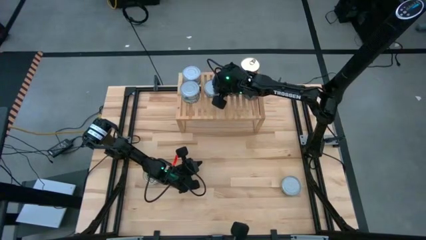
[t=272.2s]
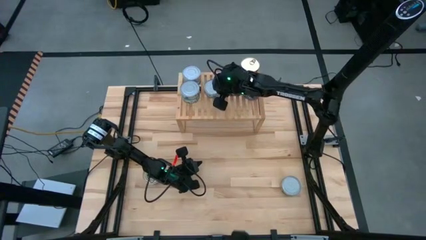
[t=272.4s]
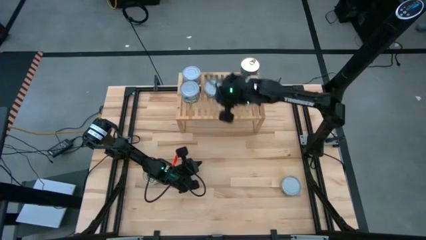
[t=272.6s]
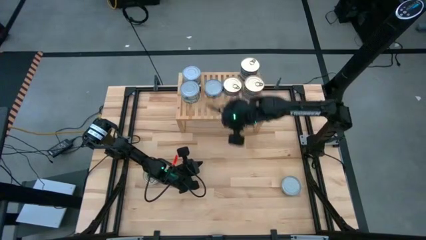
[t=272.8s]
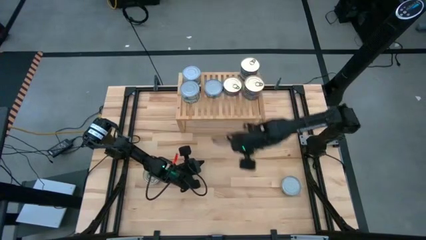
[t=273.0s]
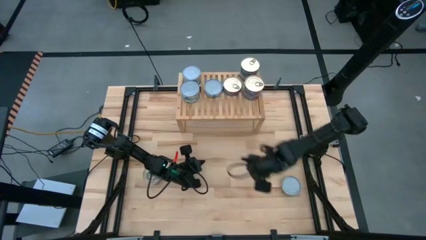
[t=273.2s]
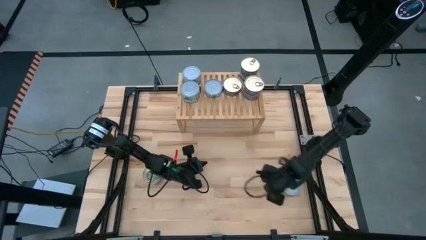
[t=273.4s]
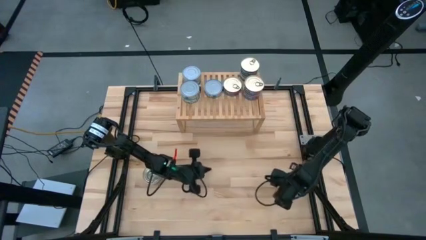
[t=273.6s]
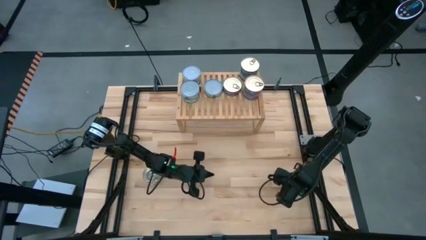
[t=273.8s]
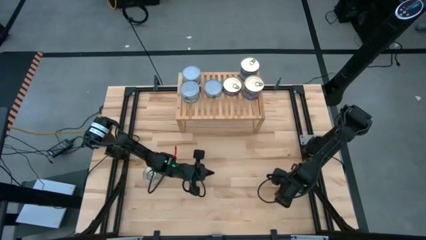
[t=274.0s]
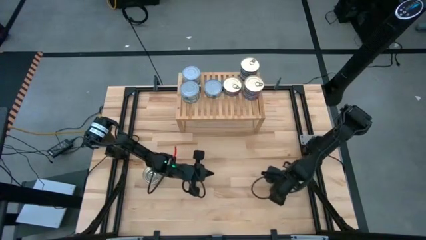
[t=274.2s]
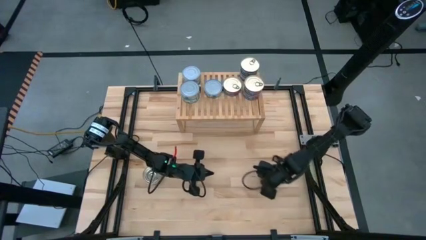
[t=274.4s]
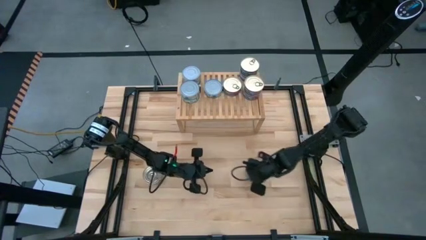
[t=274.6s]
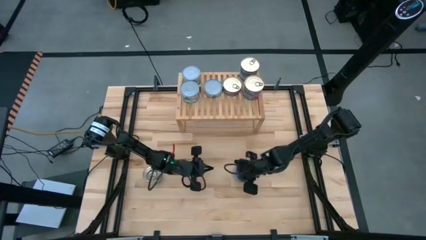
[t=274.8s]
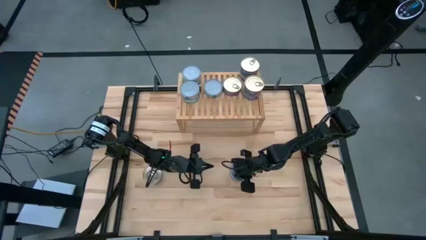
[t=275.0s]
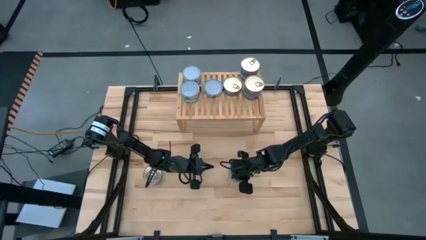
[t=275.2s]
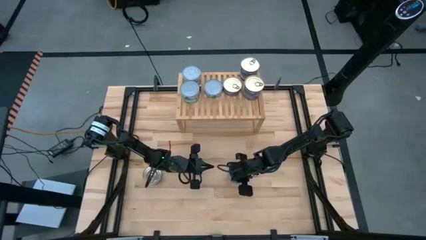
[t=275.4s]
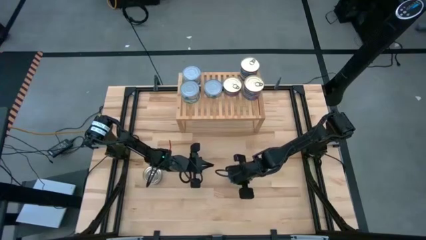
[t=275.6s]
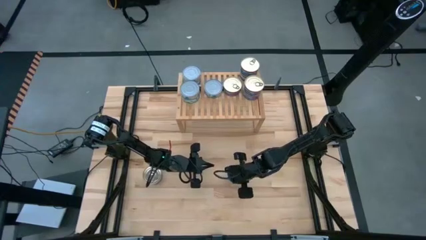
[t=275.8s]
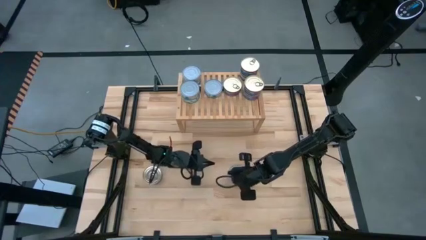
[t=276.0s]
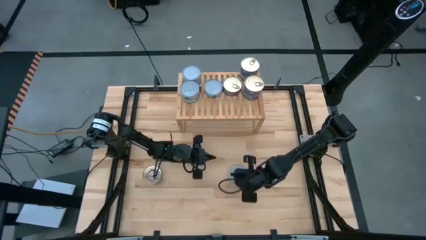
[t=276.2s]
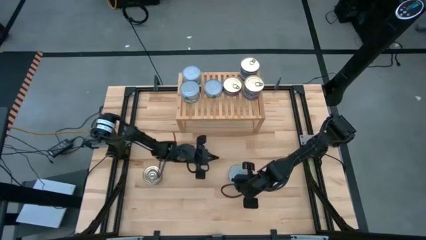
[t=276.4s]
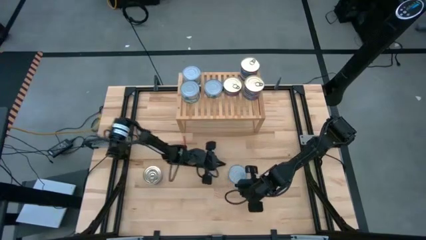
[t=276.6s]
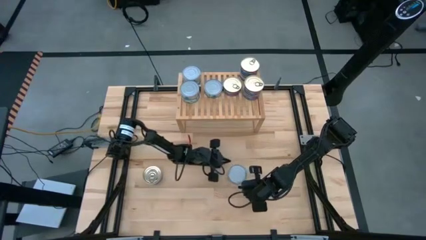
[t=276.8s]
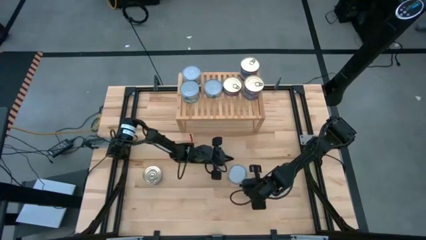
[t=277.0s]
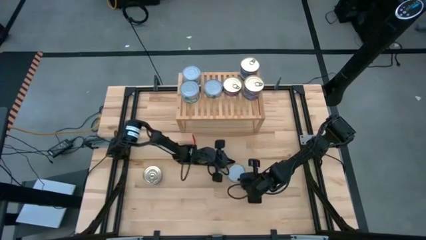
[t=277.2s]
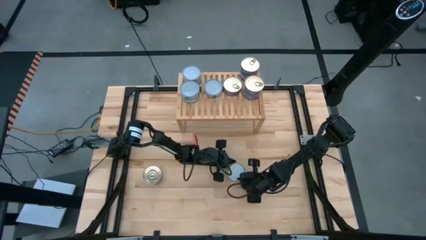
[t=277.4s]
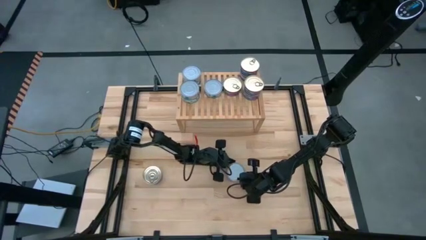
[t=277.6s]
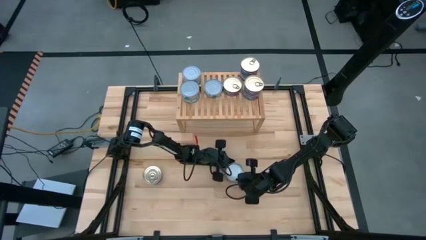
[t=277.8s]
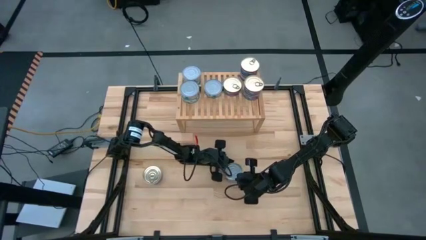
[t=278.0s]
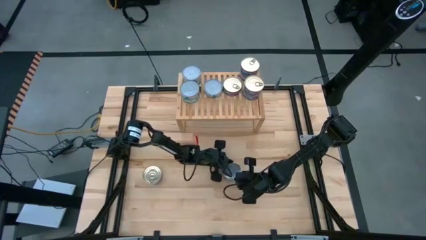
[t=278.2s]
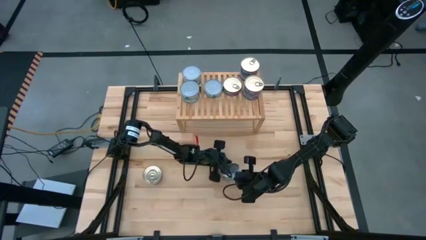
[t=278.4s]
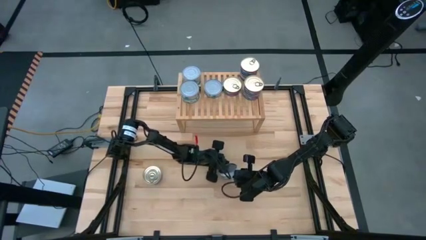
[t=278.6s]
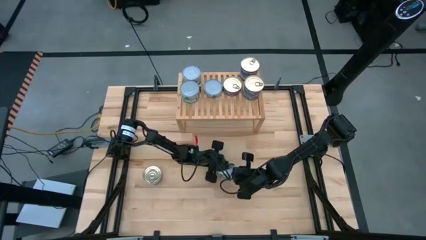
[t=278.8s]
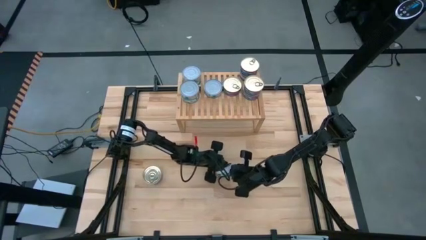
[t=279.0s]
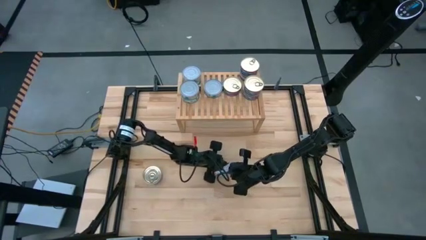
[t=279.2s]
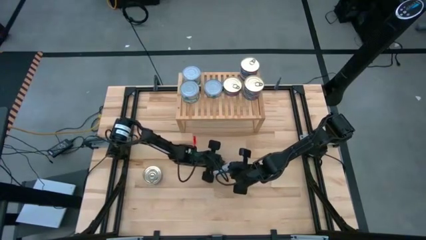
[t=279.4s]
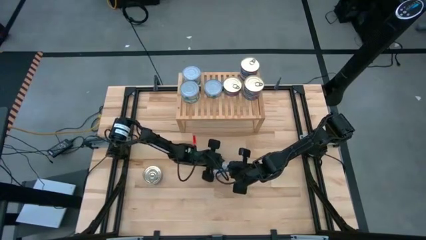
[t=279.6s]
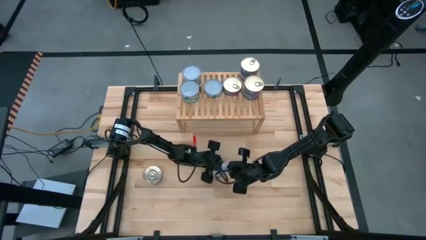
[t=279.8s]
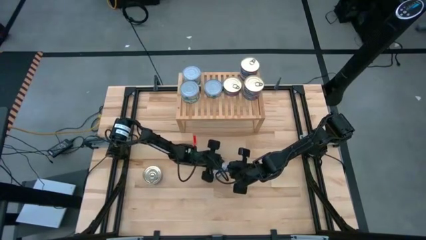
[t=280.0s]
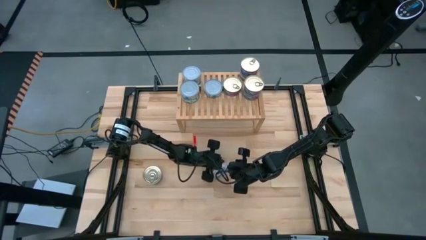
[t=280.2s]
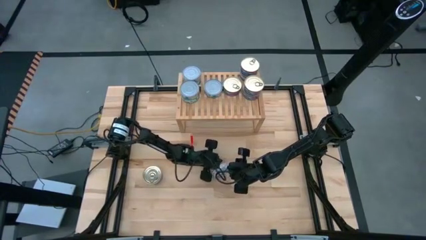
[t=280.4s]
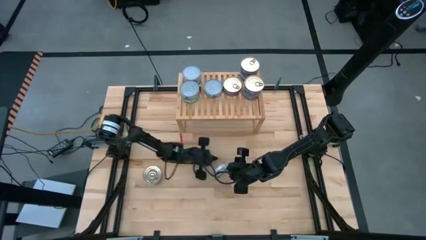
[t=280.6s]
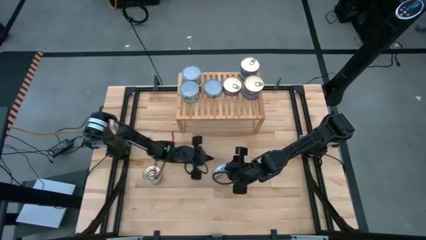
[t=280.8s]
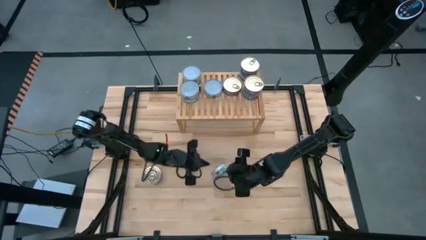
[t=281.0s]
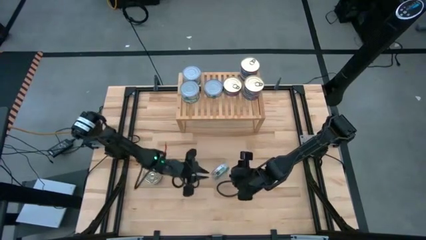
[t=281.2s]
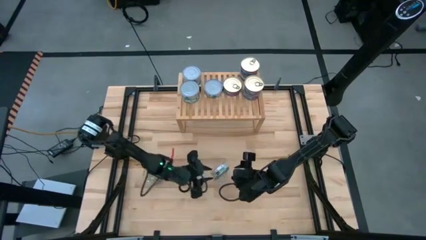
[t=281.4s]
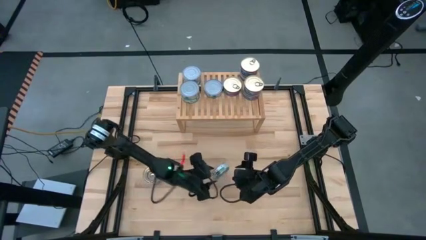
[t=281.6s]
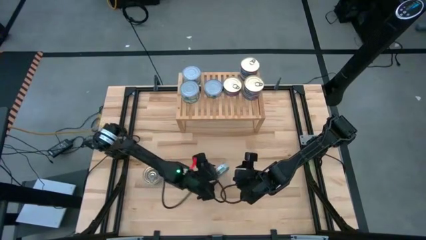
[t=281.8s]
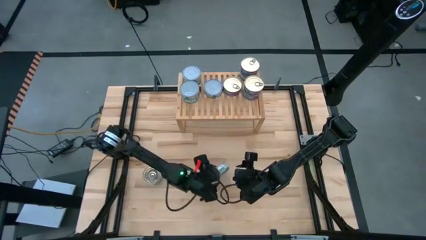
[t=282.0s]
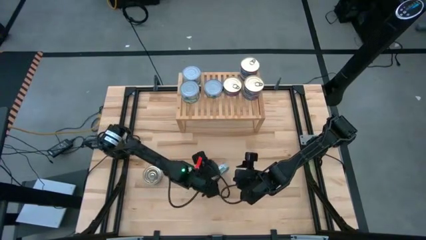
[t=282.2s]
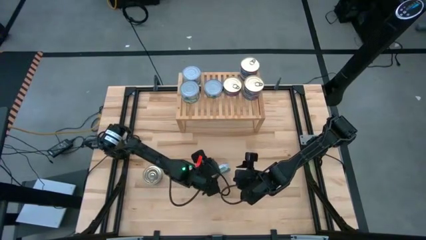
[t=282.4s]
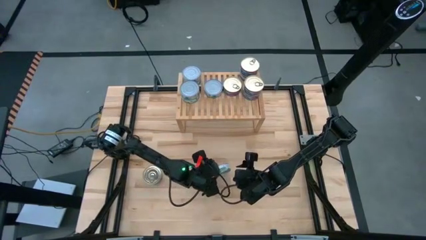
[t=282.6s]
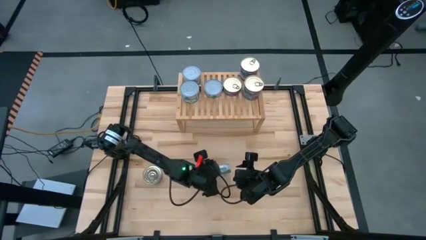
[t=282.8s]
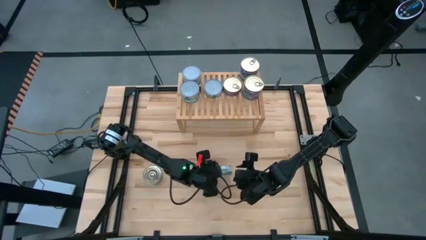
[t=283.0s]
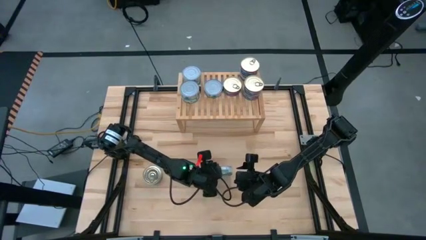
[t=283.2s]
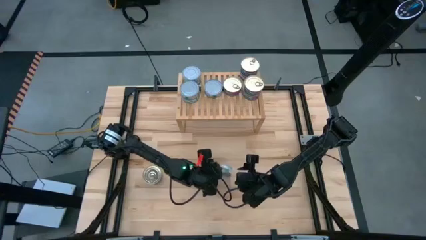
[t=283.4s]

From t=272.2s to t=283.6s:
Task: Stack canned seafood by type on shelf
Stack the green tuna can on top of the other green tuna can on the shelf

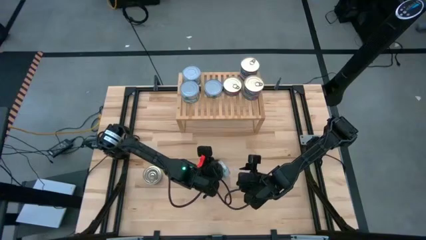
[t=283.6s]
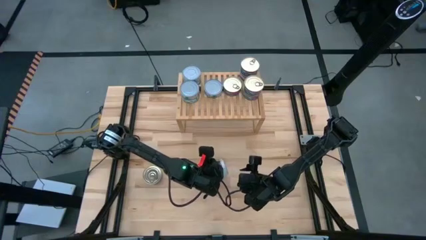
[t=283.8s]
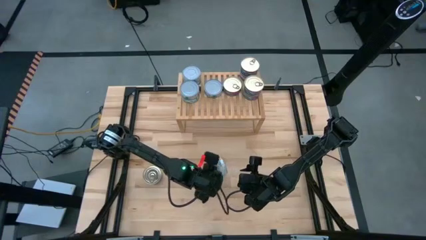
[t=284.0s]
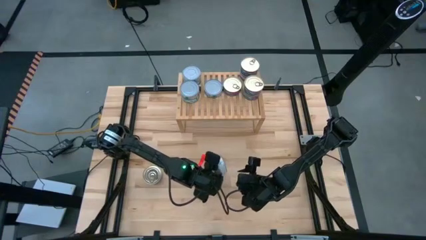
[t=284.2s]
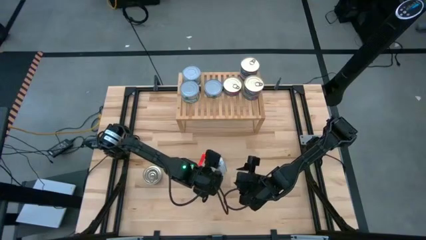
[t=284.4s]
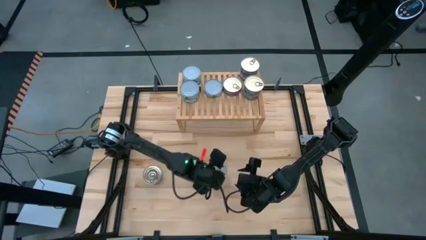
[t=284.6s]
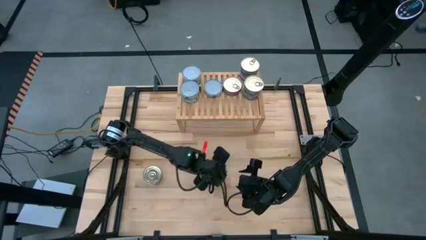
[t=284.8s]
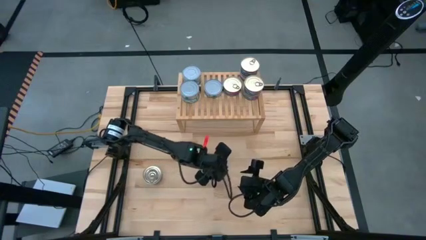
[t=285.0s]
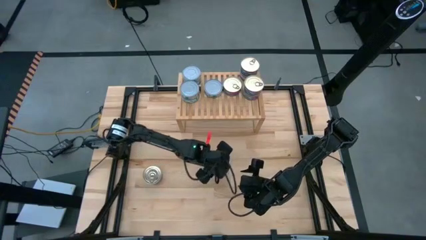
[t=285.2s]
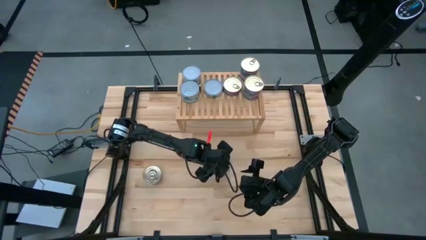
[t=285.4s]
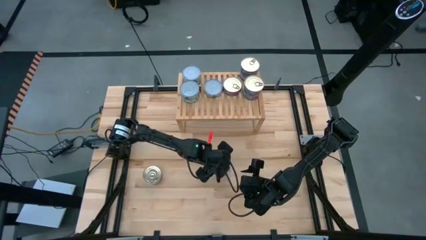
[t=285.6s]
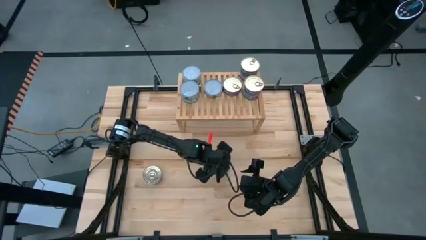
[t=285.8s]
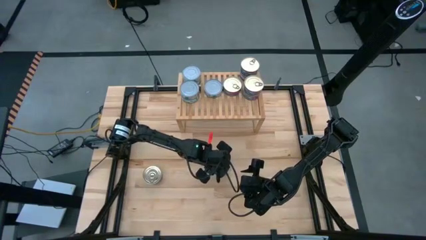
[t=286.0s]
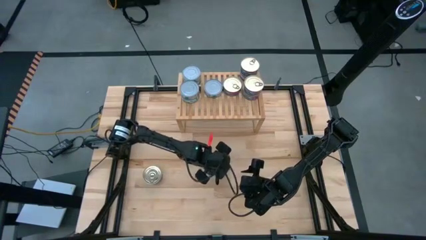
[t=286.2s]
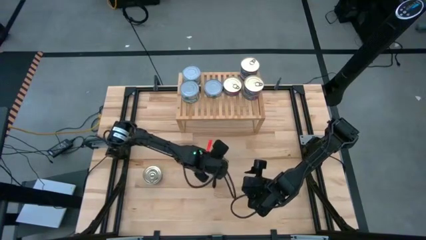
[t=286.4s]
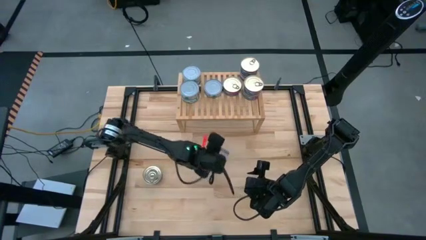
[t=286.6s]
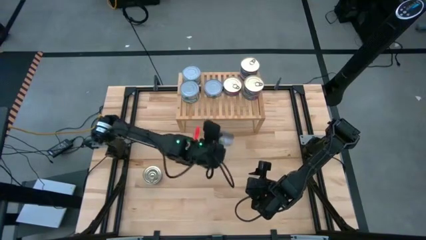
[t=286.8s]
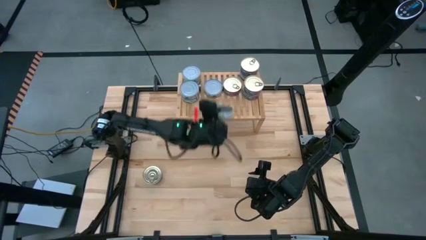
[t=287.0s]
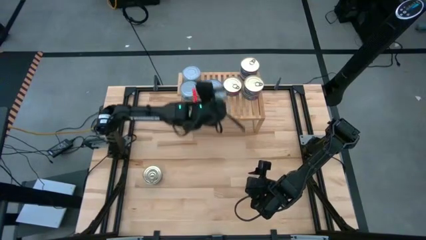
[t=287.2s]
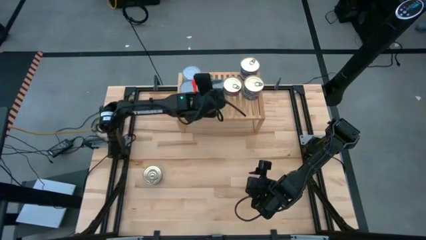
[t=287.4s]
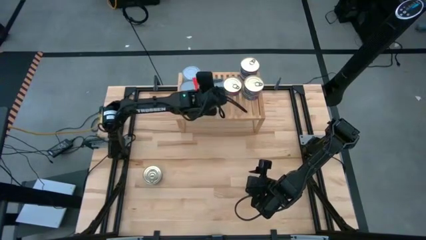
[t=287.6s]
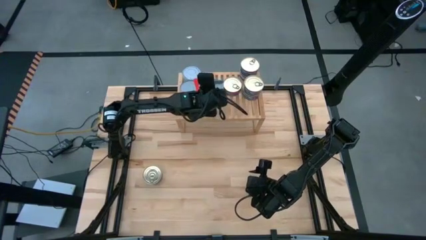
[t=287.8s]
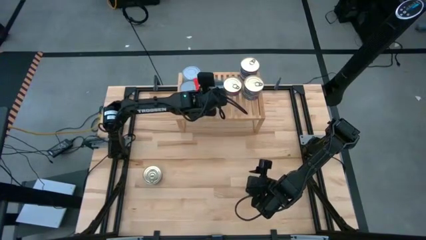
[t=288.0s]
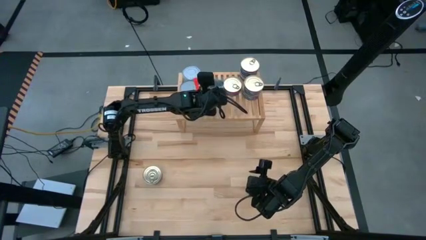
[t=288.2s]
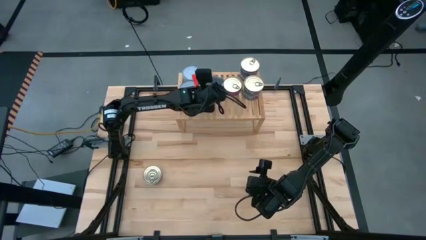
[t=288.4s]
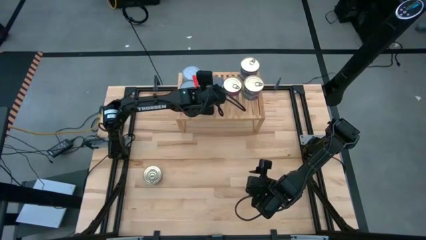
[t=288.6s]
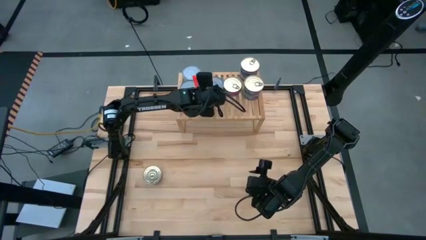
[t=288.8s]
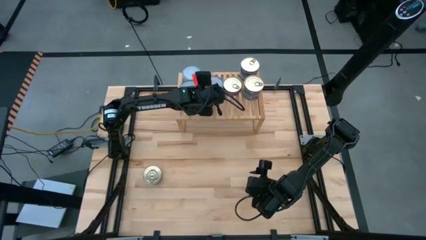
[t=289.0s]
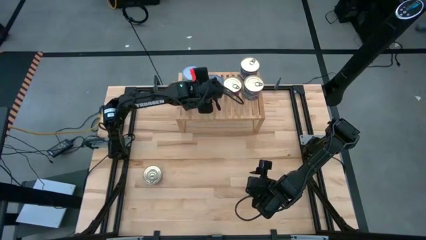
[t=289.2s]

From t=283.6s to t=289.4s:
Stack the green tuna can on top of the other green tuna can on the shelf
